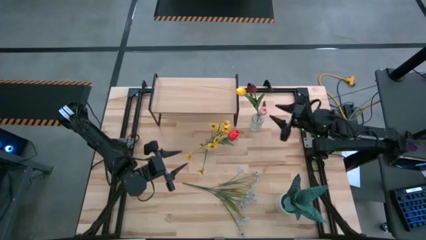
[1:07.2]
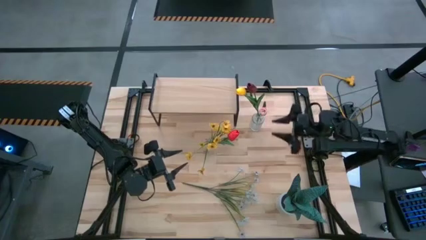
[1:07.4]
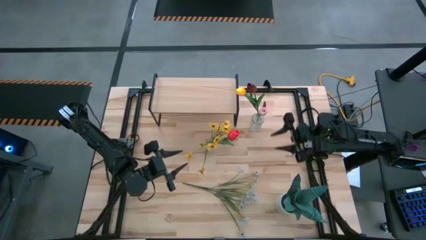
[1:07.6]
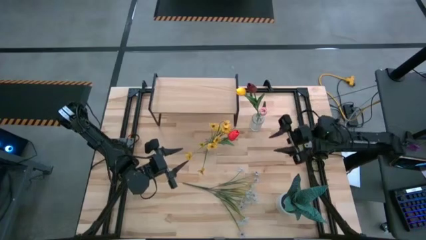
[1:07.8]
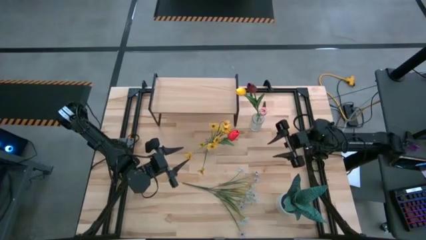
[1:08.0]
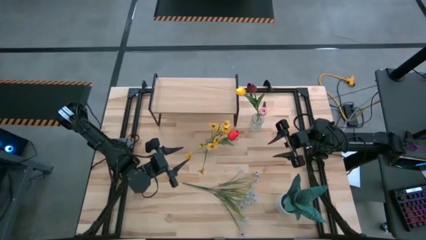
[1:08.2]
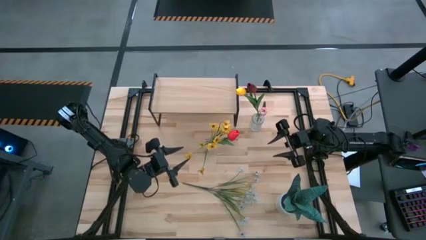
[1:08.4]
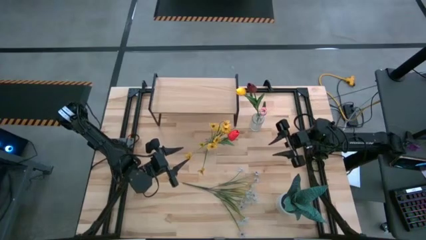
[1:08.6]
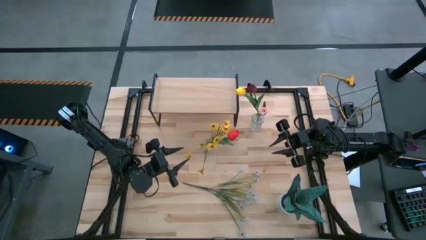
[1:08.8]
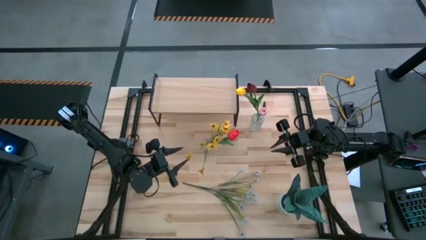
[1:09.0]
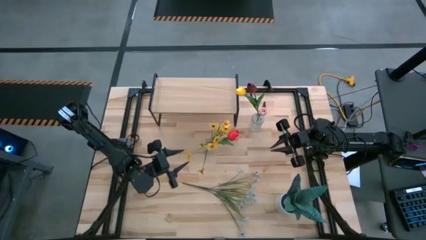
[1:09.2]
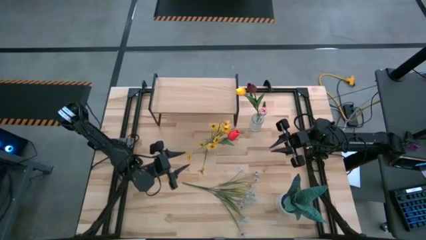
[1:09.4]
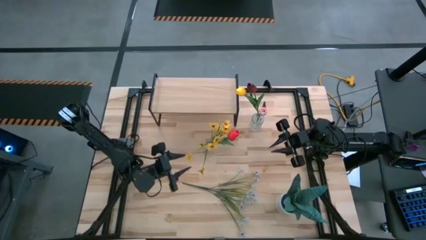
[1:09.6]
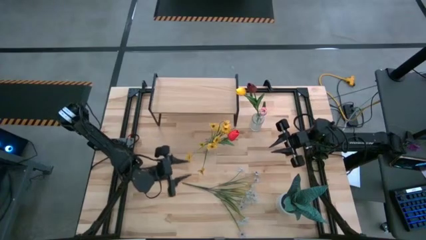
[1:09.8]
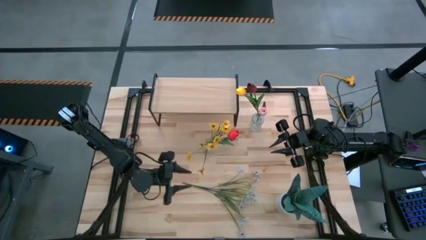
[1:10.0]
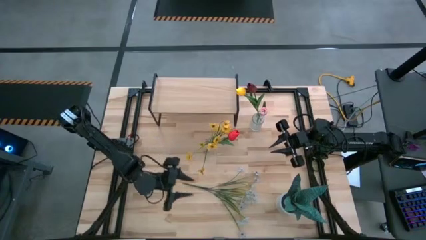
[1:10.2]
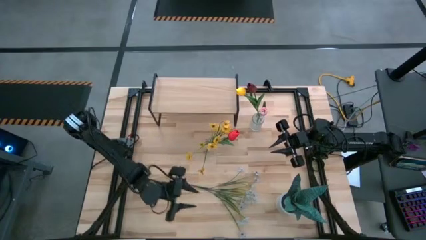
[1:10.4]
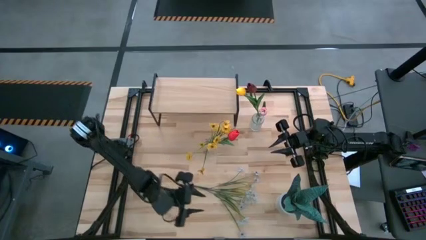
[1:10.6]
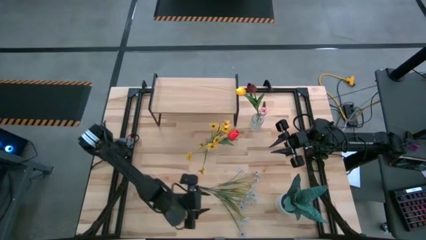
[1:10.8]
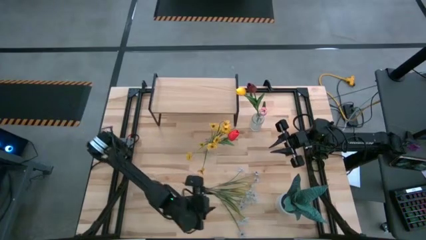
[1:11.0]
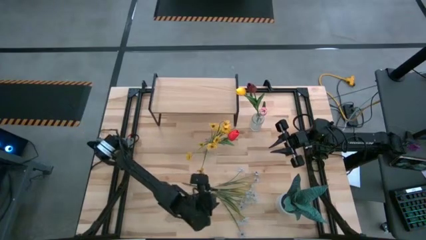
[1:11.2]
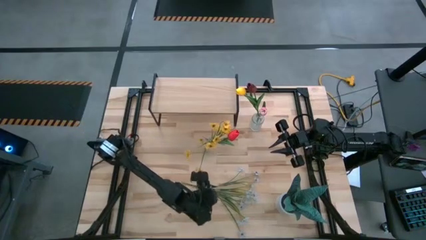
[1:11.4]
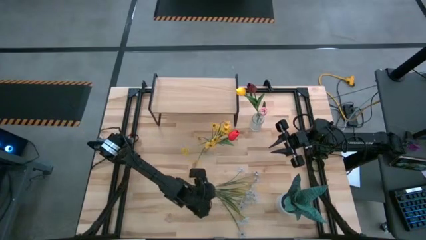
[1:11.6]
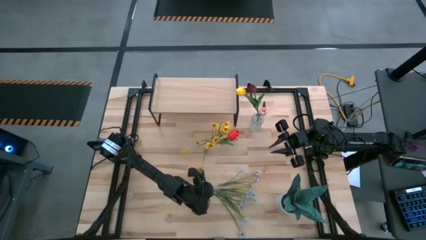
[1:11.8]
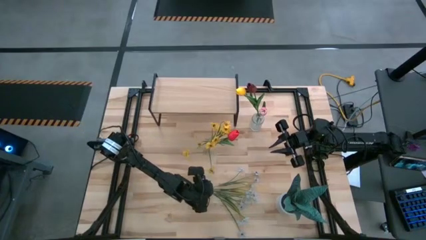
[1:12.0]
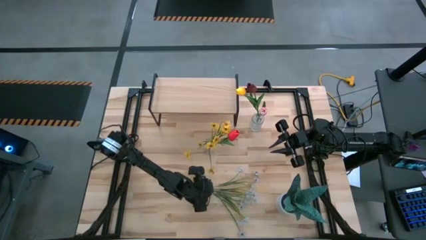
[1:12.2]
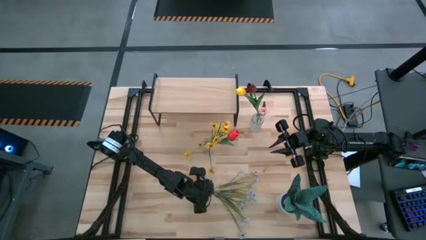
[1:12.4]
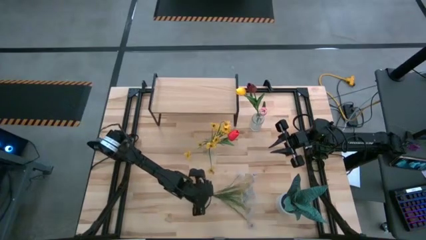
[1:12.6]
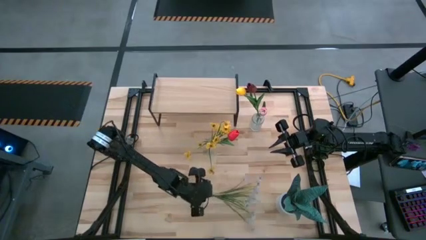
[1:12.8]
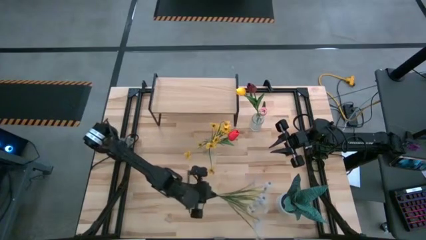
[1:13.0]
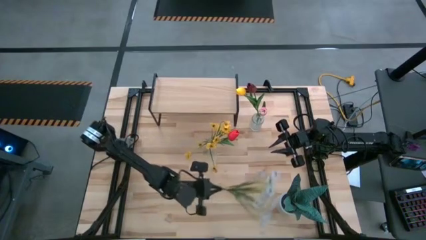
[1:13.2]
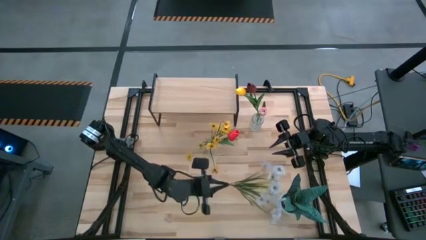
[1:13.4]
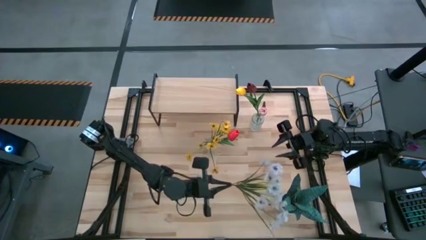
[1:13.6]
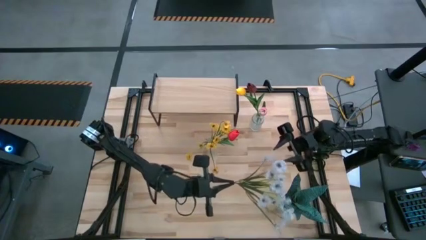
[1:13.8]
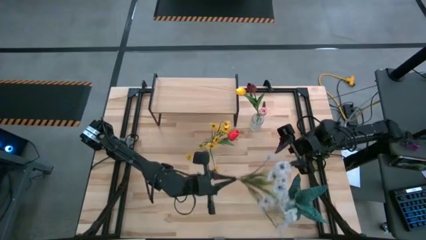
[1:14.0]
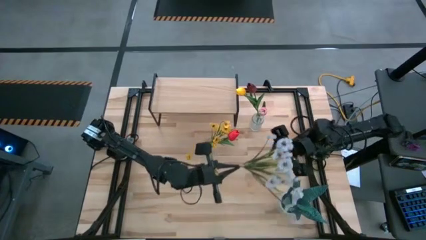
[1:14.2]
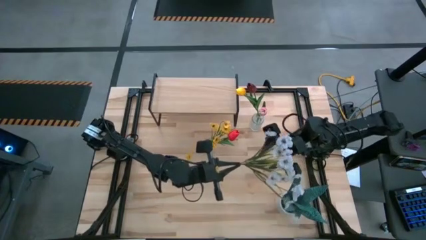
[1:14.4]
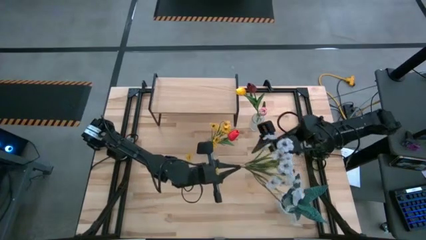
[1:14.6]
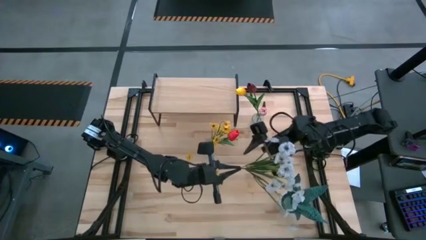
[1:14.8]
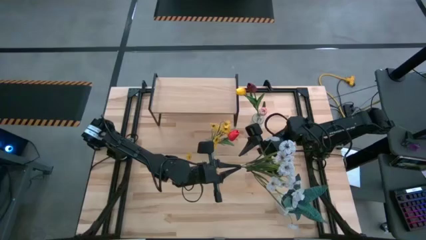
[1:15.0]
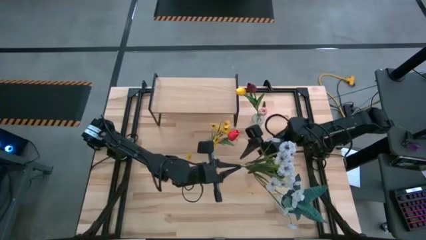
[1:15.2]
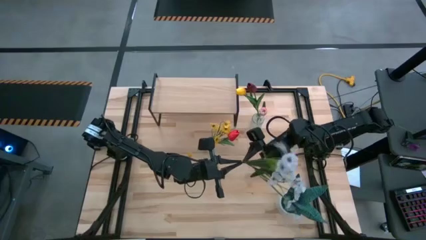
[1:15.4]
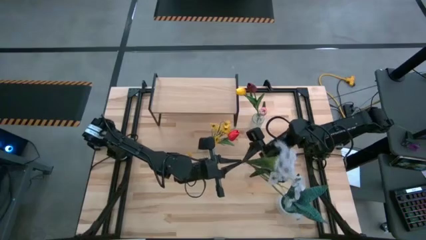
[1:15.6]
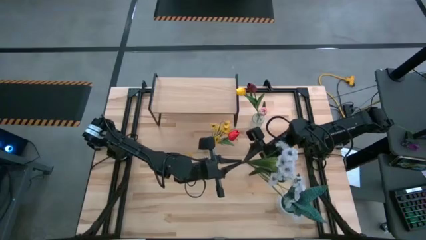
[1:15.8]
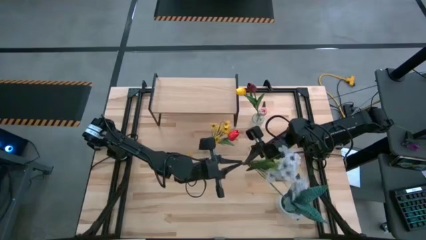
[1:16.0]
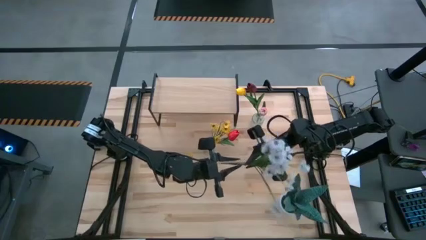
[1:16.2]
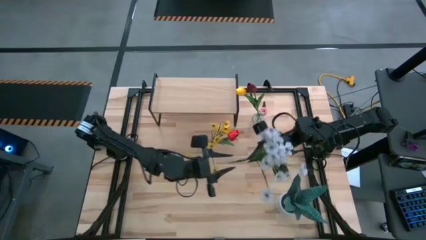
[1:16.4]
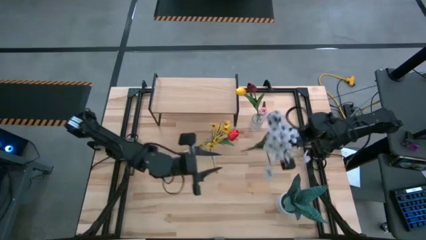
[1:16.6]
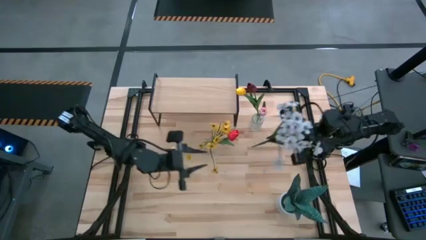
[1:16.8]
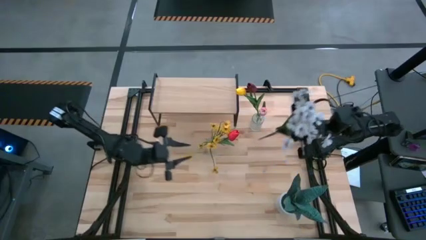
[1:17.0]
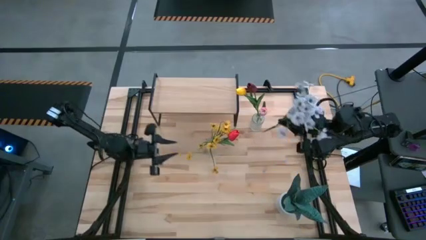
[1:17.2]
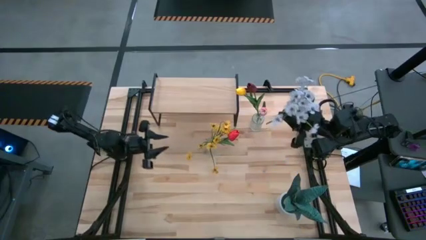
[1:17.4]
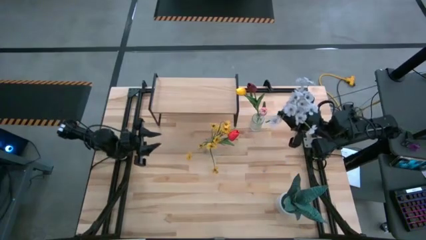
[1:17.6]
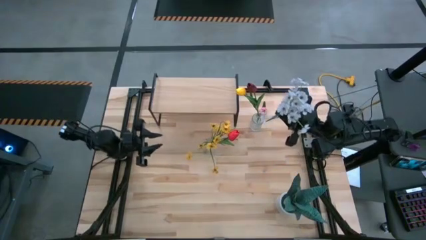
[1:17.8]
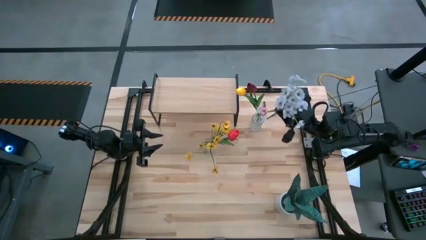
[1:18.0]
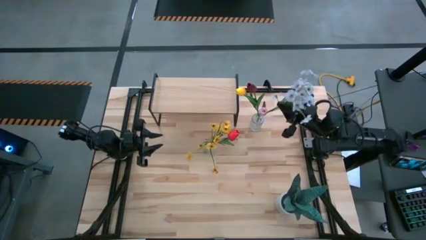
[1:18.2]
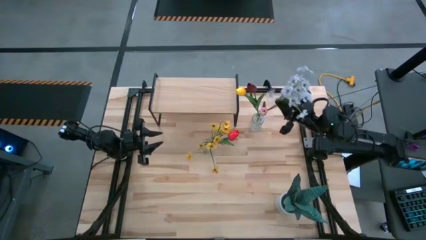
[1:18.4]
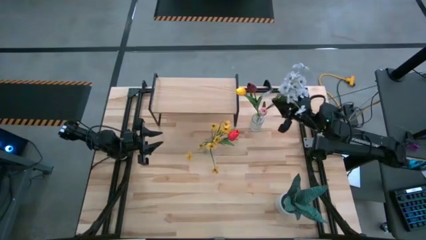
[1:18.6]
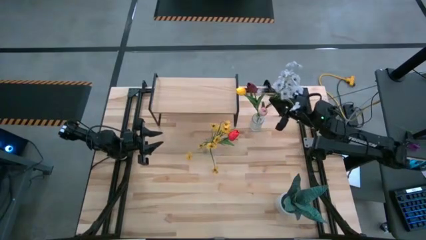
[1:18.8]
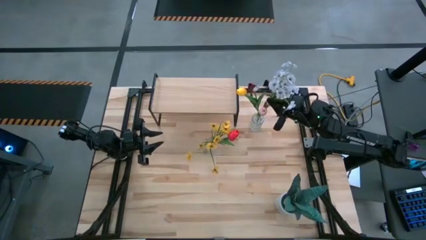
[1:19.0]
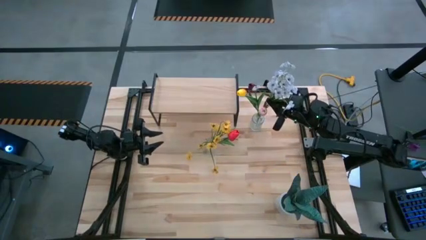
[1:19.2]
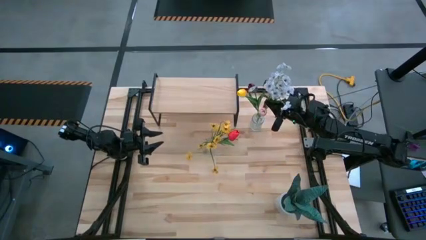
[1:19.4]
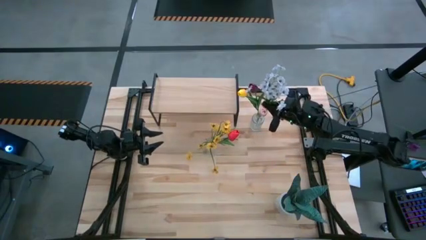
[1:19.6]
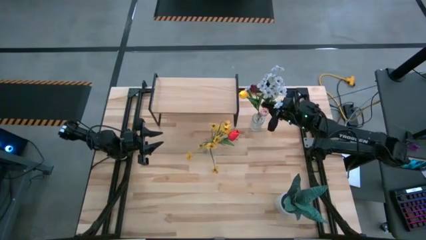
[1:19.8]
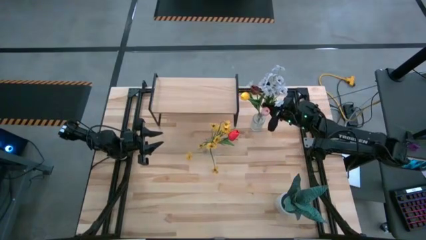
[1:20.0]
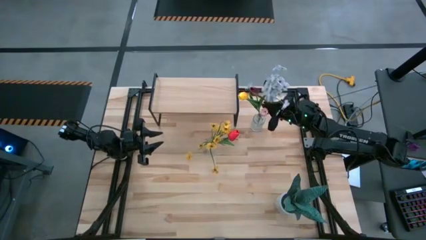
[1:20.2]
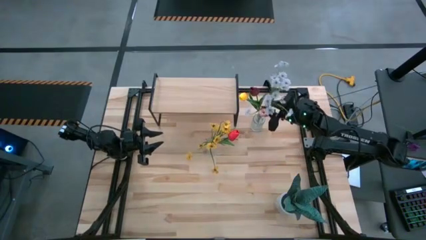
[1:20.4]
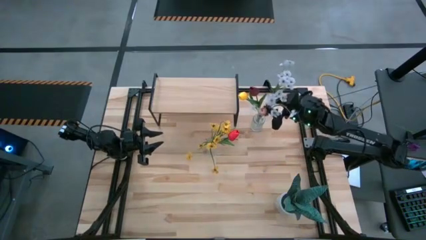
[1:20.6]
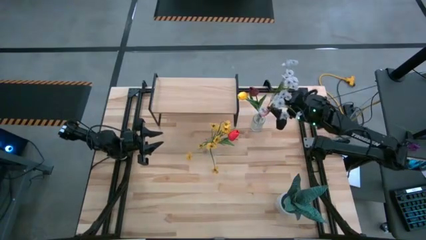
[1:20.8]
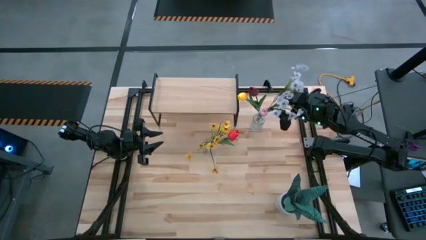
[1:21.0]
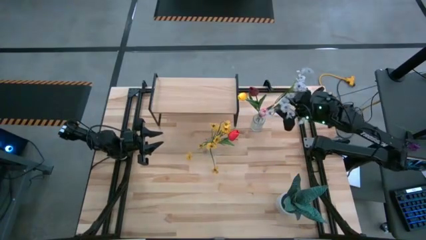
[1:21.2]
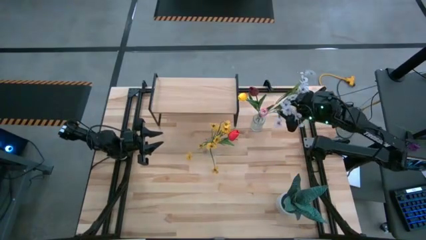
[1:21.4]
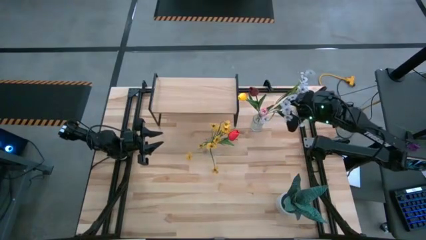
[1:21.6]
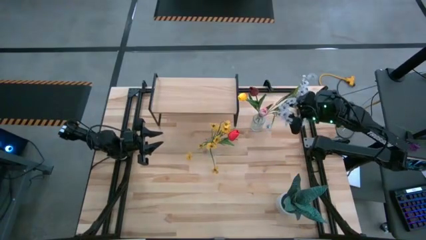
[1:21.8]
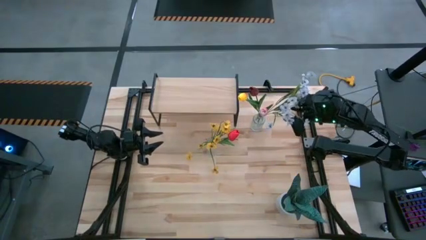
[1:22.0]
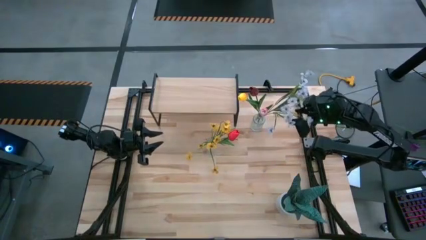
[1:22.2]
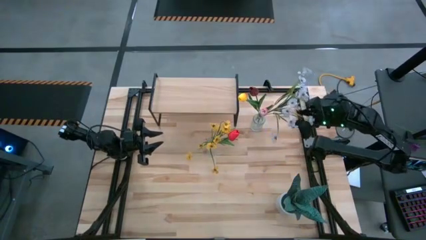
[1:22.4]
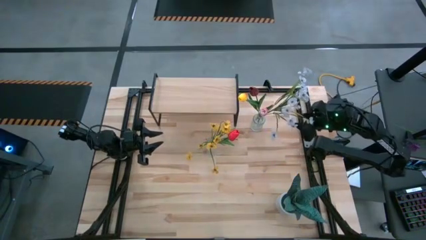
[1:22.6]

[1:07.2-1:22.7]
Task: Pick and place flowers into a vace then onto a shelf
Put the white flowers into the top transparent vase
